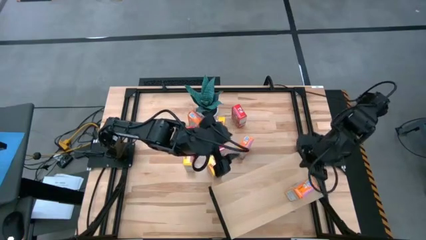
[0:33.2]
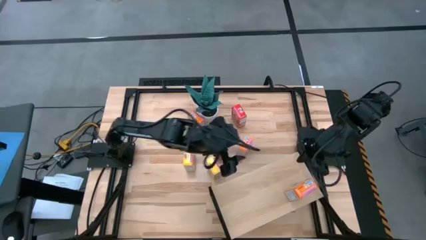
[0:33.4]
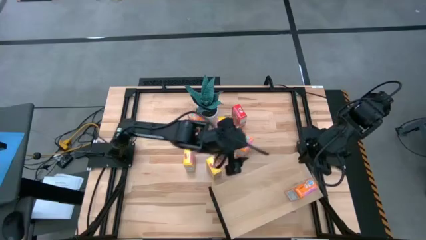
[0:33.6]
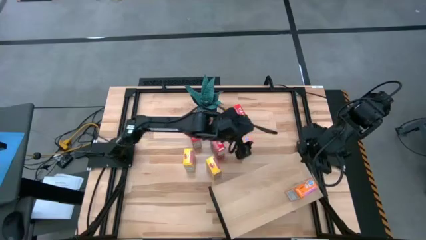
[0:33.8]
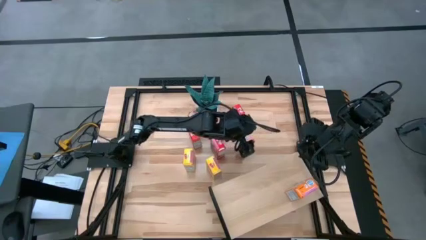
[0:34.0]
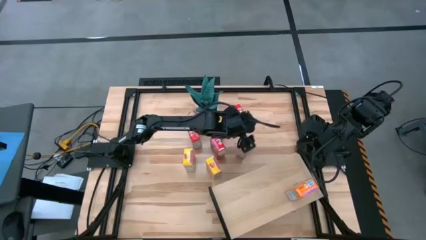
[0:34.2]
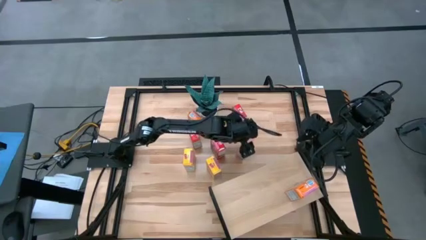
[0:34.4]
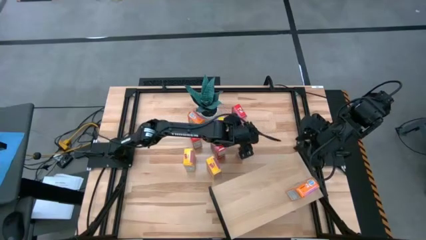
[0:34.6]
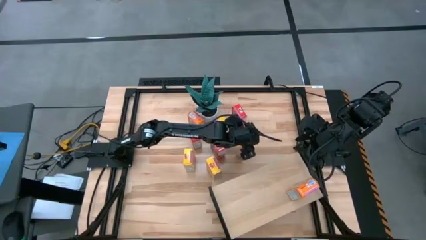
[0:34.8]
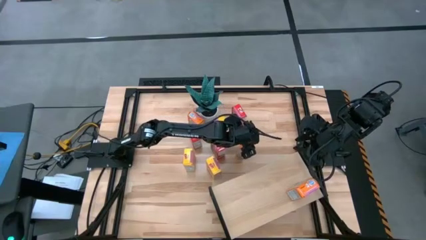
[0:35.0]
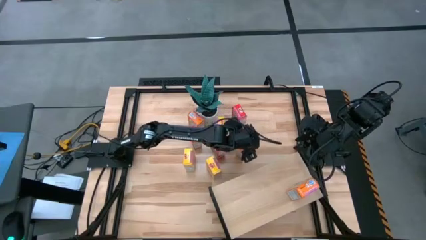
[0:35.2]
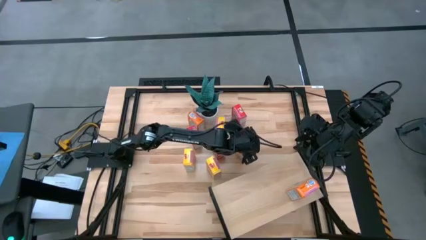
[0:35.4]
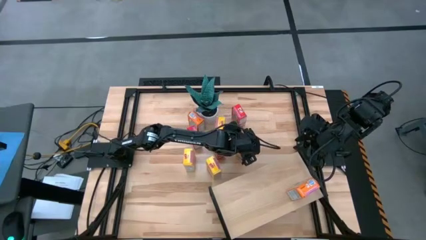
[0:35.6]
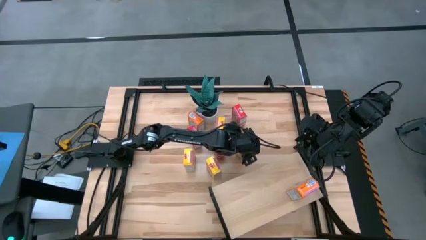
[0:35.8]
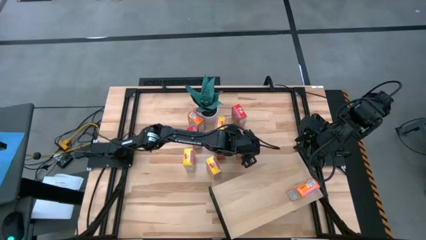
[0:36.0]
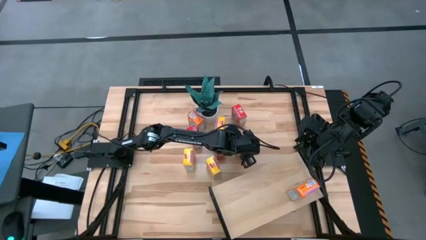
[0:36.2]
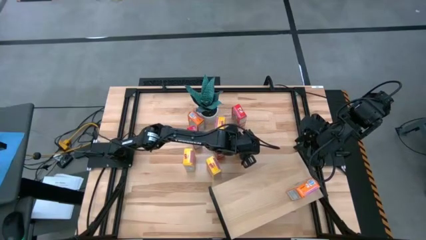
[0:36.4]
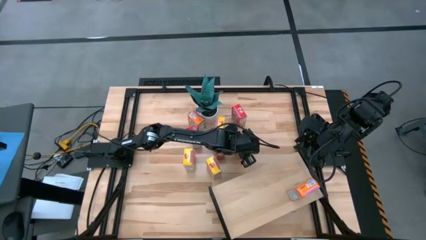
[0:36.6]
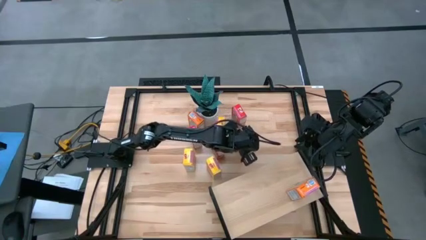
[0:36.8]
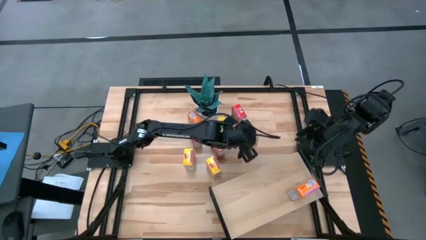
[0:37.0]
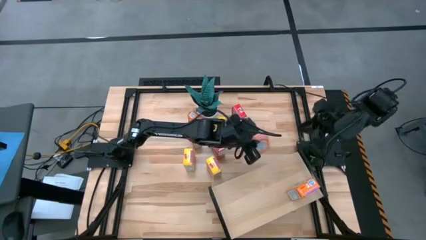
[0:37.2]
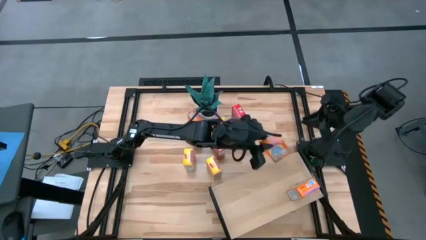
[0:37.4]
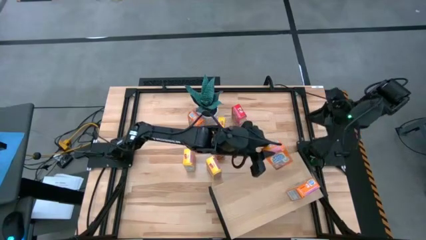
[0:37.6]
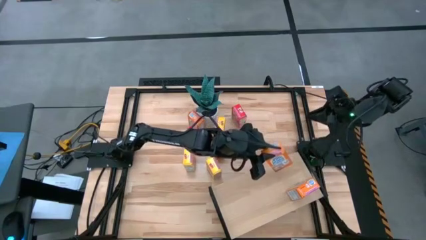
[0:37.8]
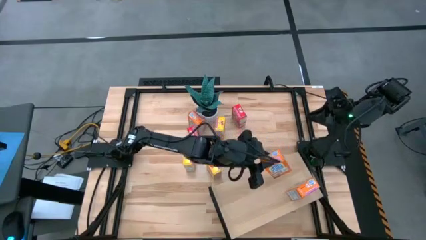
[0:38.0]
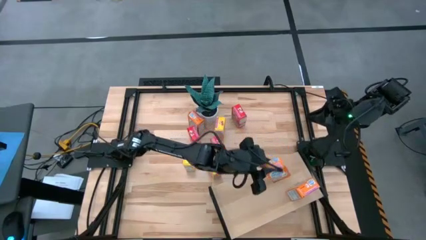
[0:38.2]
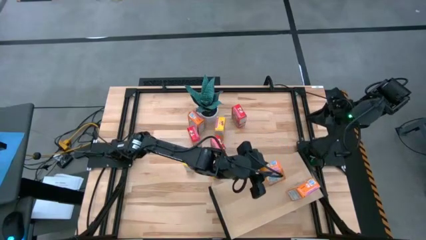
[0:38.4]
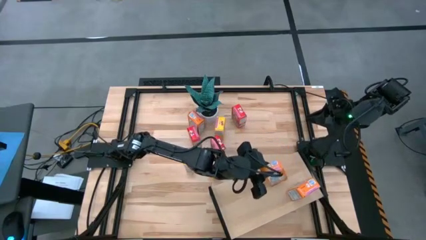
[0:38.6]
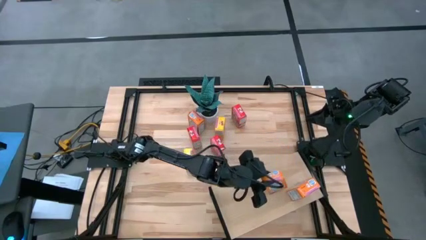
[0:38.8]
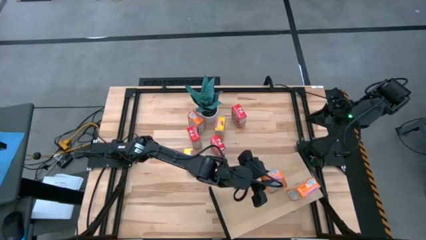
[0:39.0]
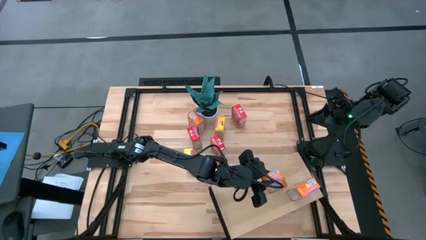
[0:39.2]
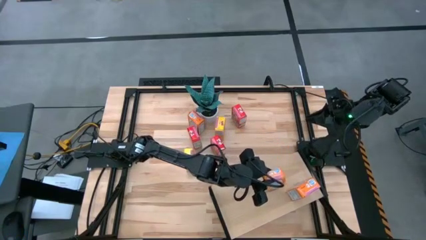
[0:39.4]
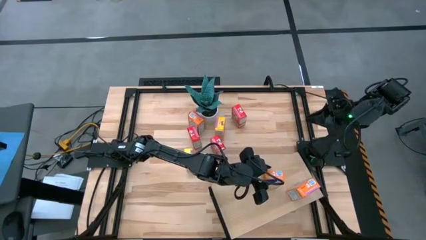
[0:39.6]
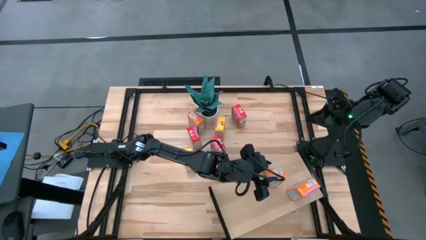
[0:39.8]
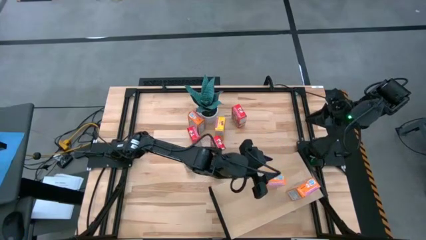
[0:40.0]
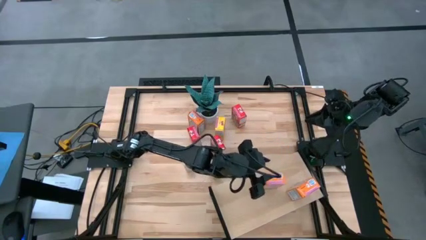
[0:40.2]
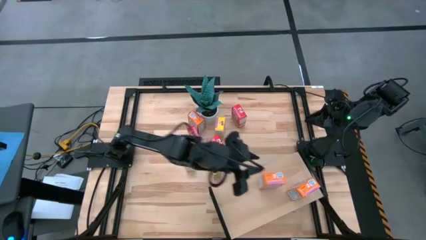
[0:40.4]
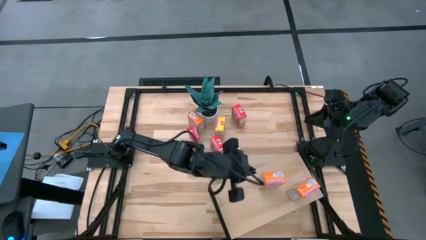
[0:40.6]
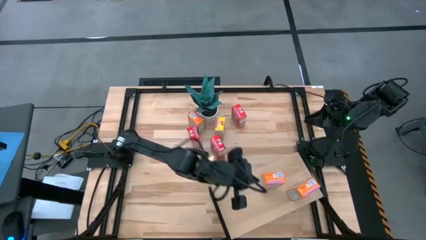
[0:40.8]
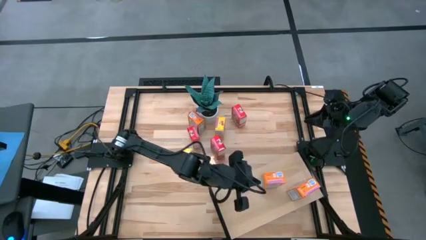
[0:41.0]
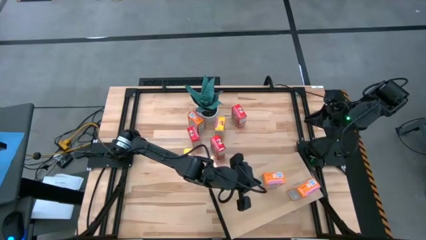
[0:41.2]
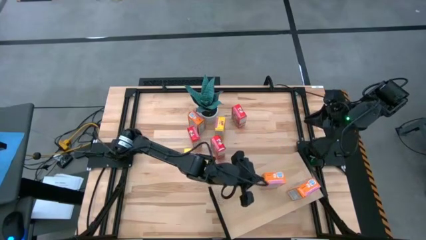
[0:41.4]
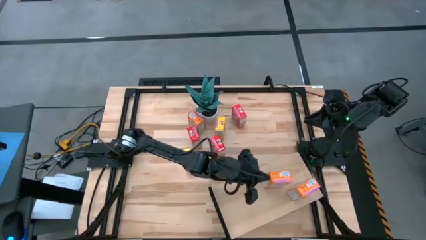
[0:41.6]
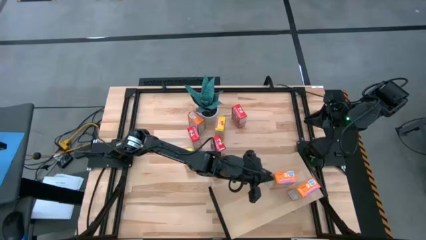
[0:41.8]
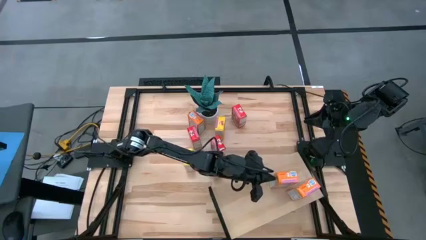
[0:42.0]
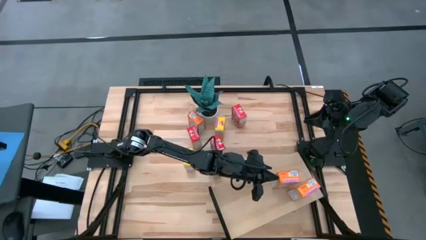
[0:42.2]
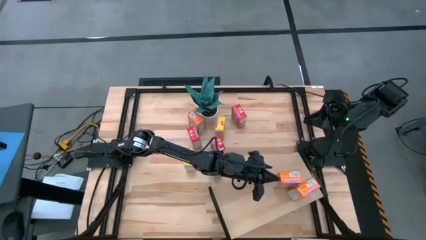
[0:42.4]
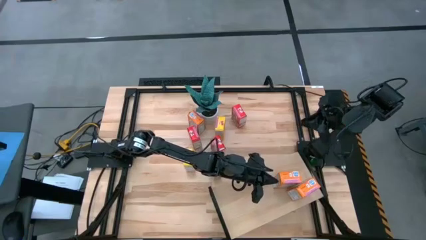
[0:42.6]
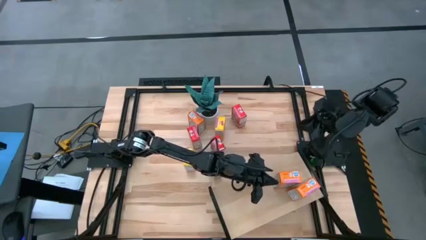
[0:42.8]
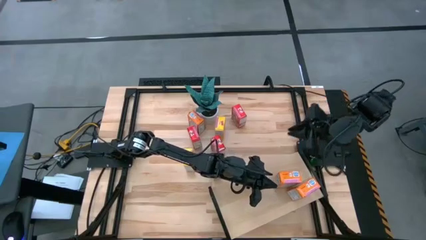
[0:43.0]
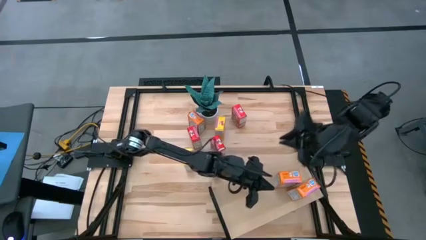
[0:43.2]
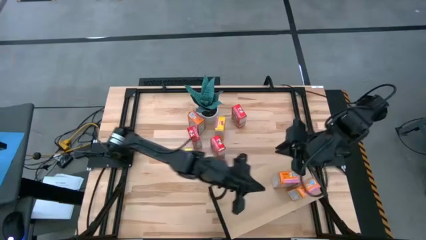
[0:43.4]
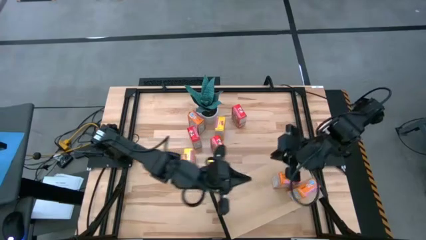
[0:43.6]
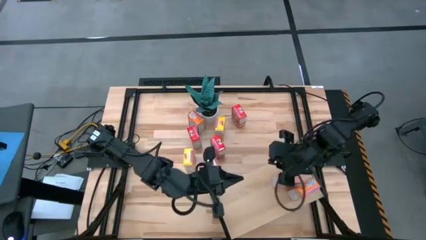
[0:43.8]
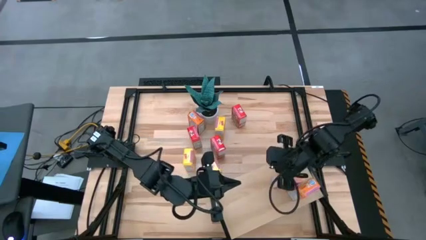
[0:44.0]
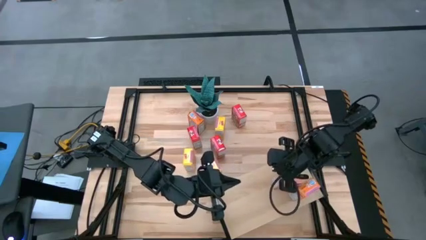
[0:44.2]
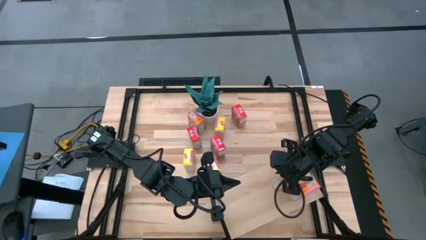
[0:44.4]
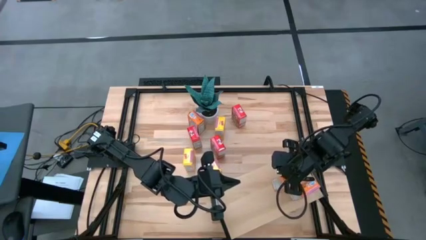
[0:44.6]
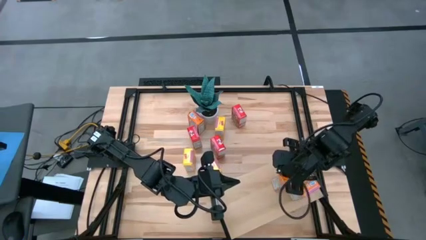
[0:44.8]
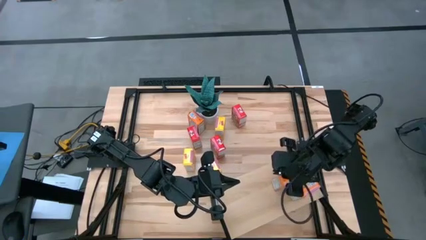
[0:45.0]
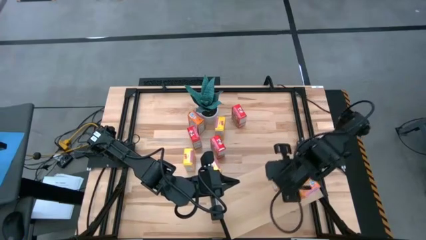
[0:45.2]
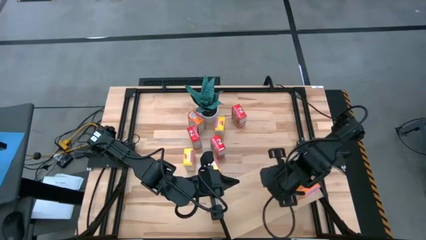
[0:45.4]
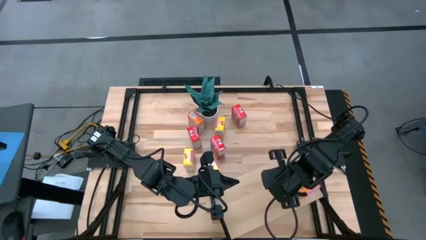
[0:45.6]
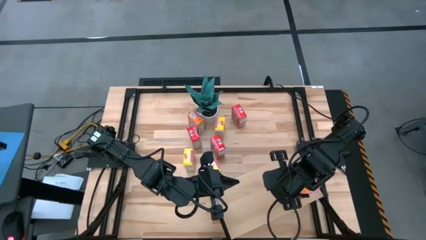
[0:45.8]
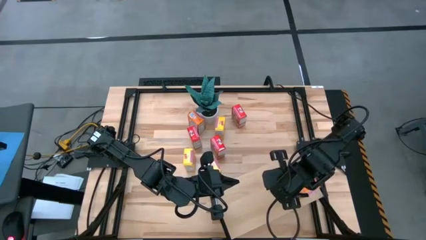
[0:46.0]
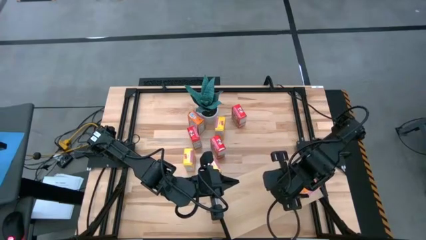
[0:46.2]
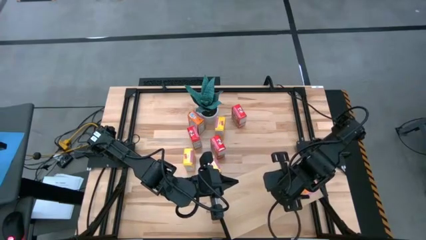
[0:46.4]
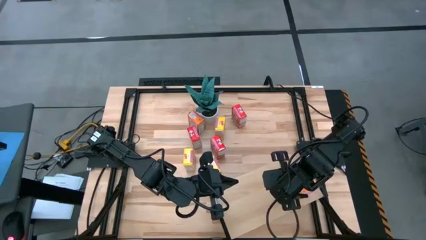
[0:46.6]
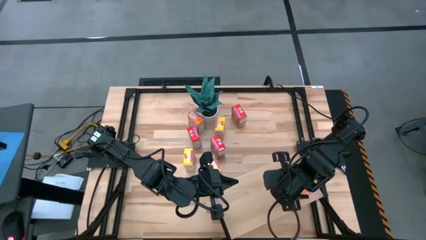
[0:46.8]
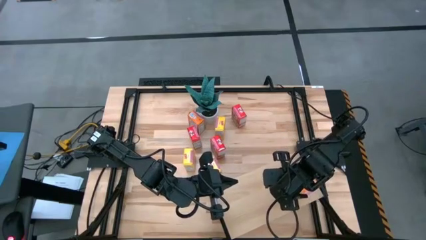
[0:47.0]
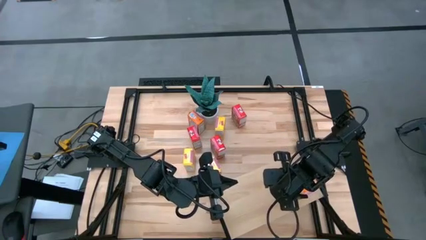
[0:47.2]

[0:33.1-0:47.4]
Task: Stack cereal on shelf
Put the bottom orange cereal box on the shelf aligned with the other orange cereal box
